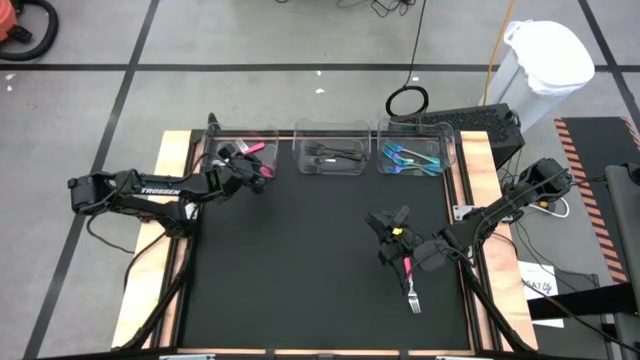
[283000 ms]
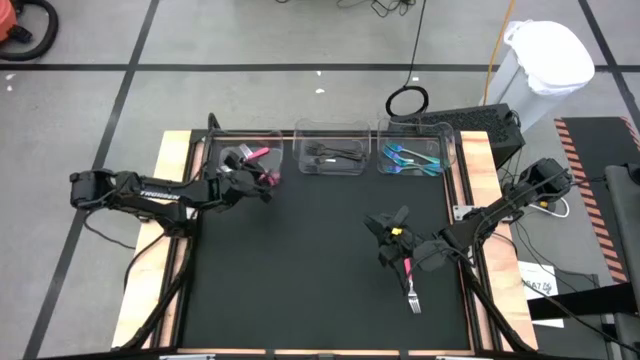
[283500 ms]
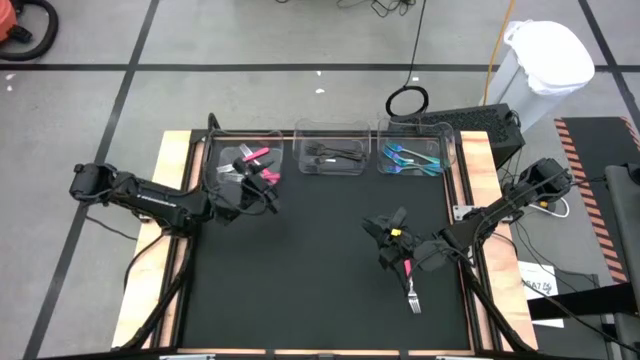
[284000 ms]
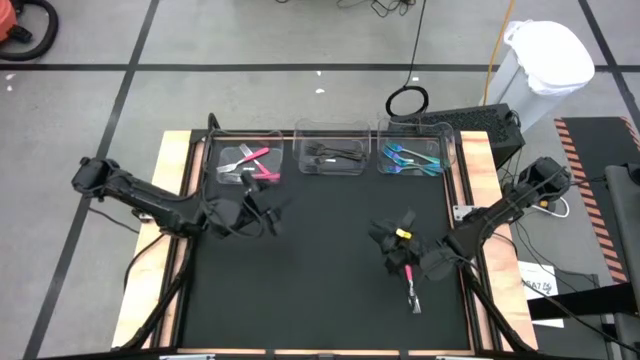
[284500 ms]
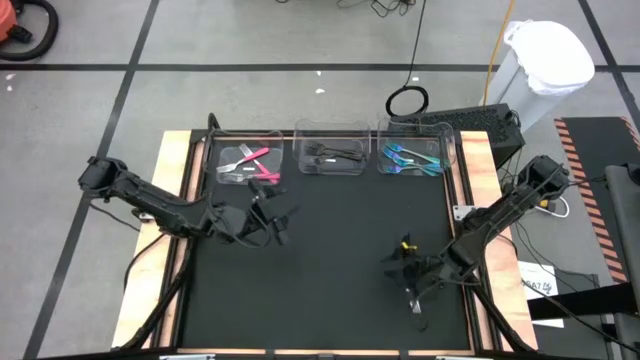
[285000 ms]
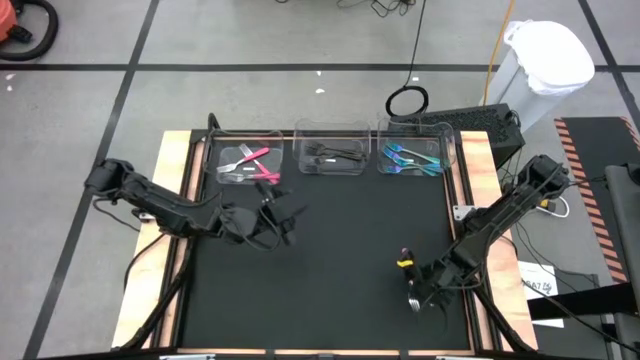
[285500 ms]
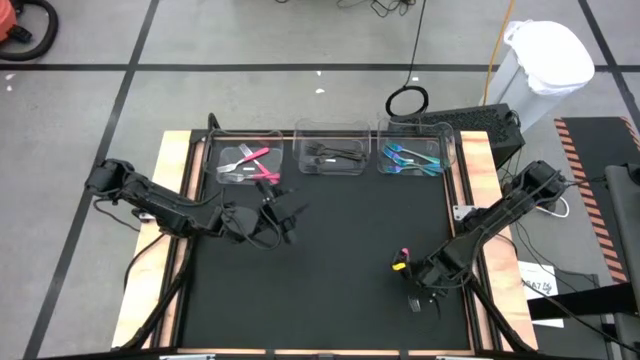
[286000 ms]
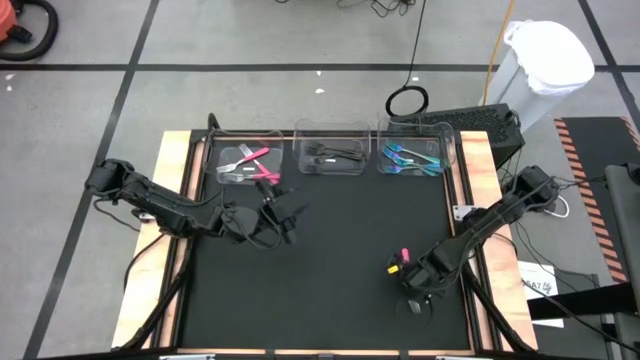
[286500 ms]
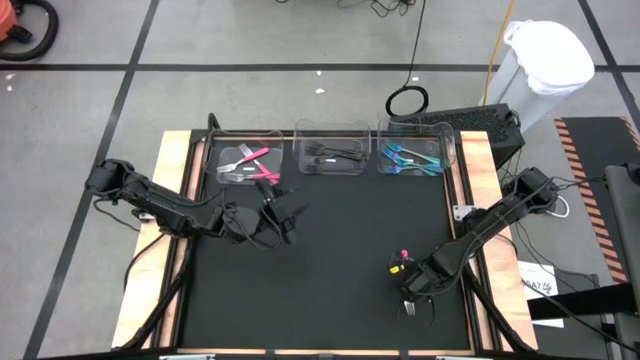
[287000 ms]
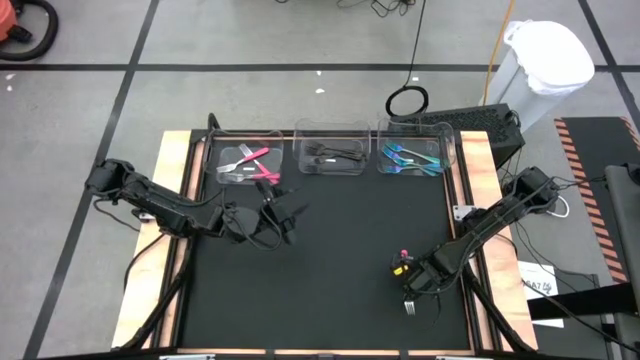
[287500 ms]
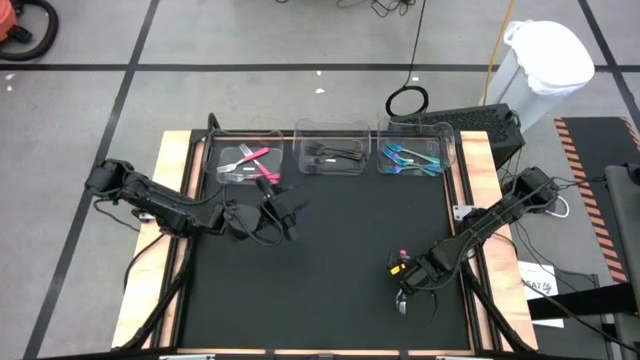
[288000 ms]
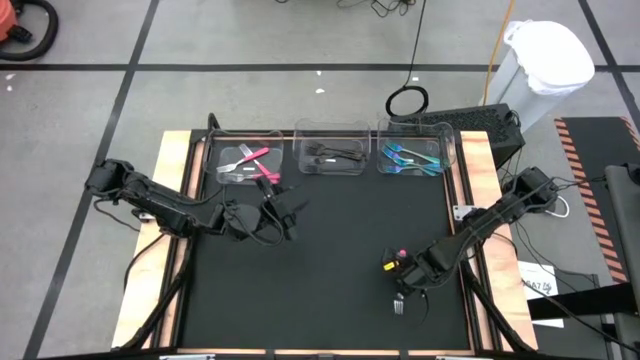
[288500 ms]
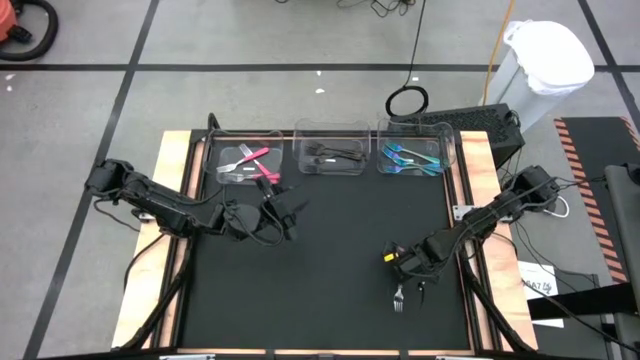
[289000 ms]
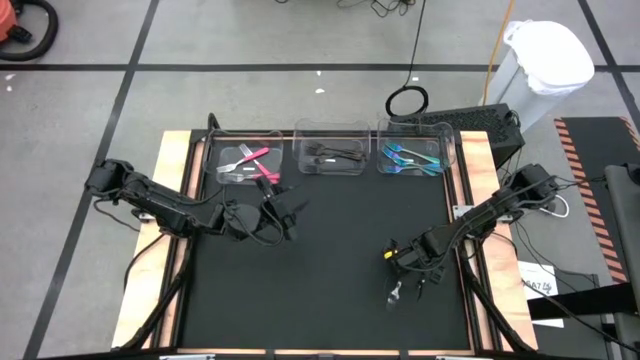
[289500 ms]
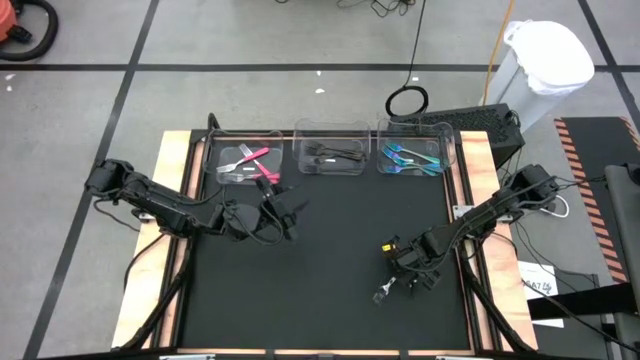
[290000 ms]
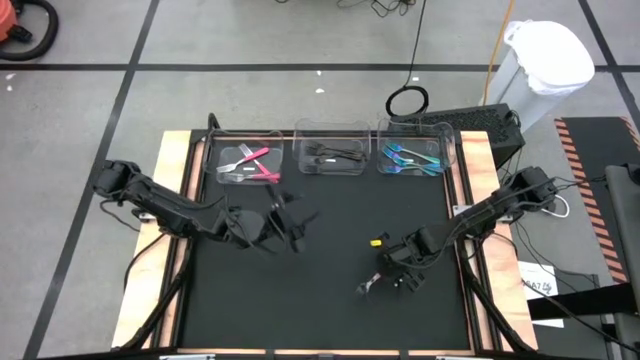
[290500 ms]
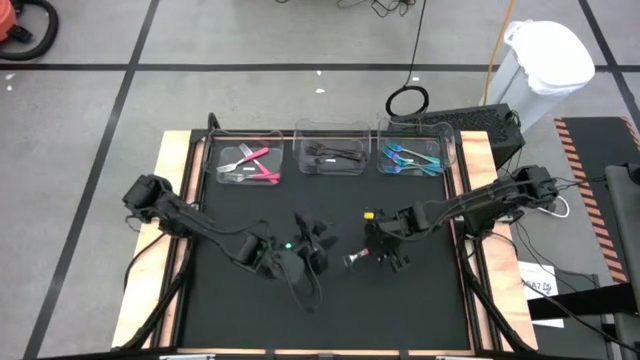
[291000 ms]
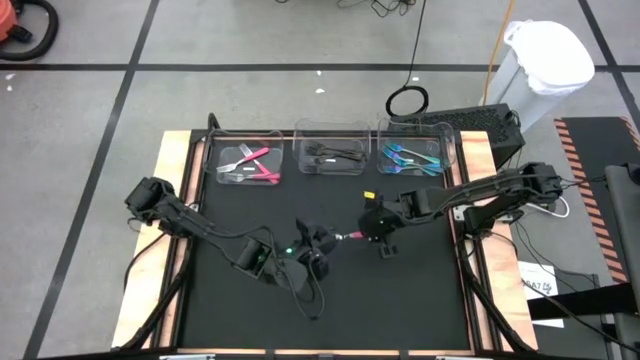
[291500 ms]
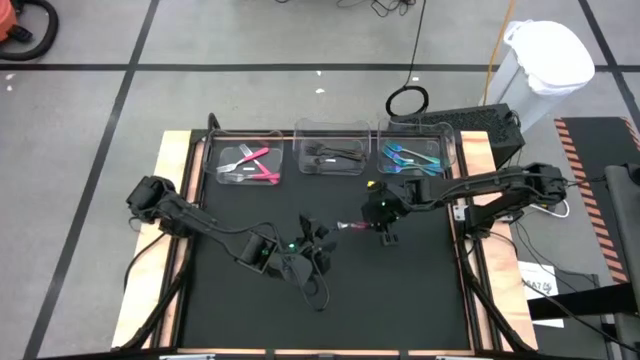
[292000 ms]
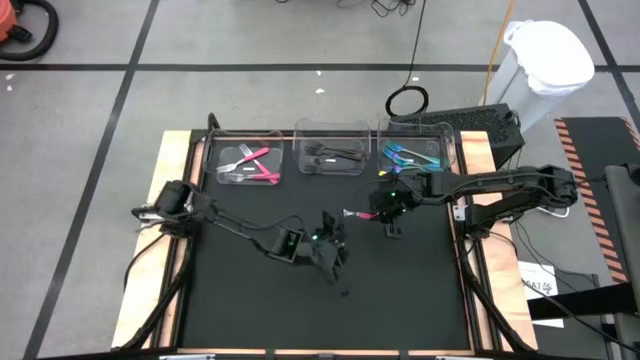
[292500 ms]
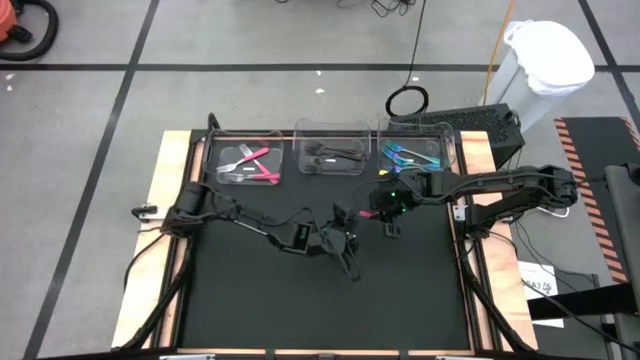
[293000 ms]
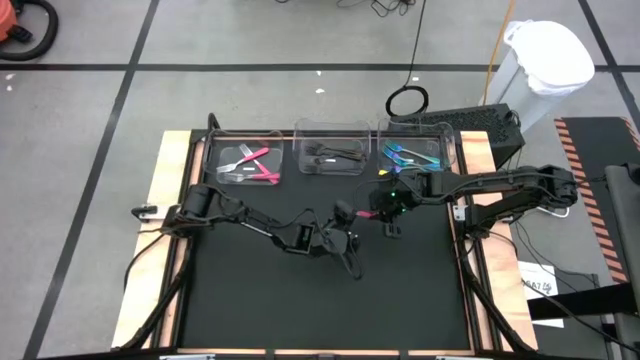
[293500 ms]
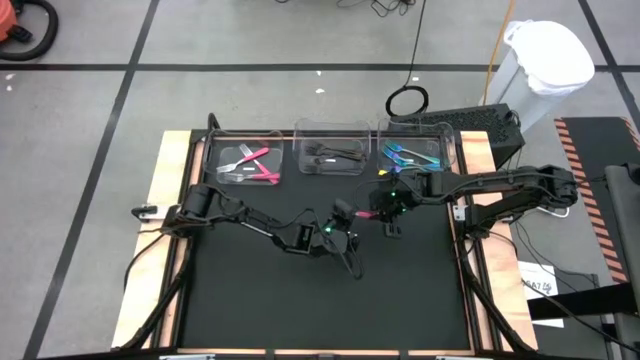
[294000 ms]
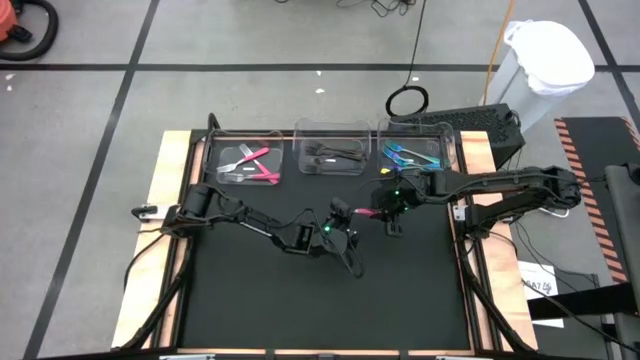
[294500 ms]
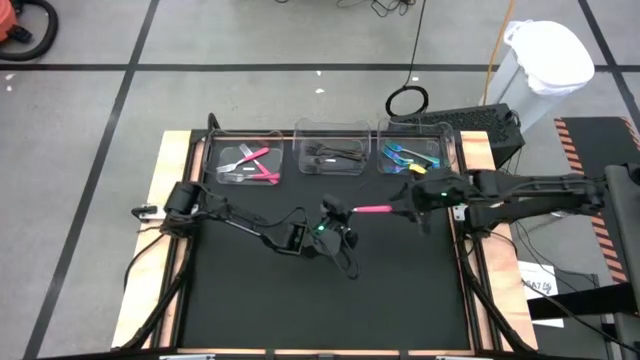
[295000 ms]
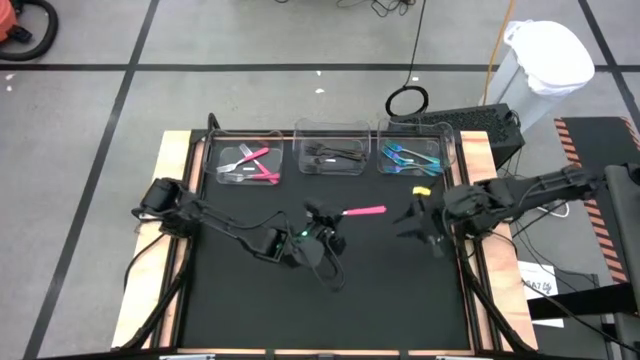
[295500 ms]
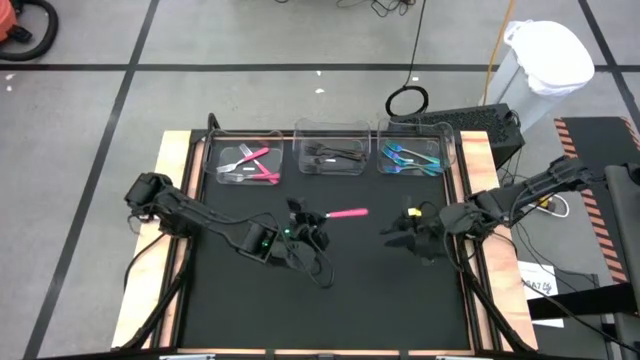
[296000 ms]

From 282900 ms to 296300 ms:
Task: Sort silverware by color (type)
Put the pink fork into the transparent bin

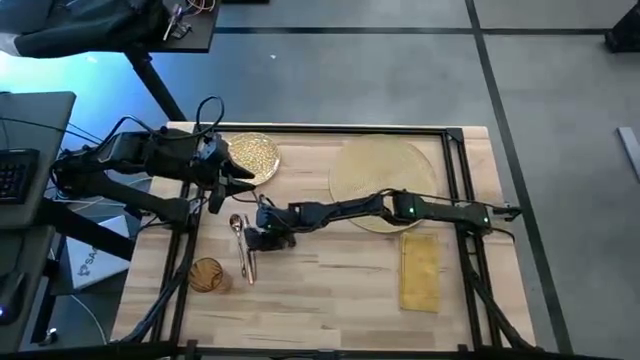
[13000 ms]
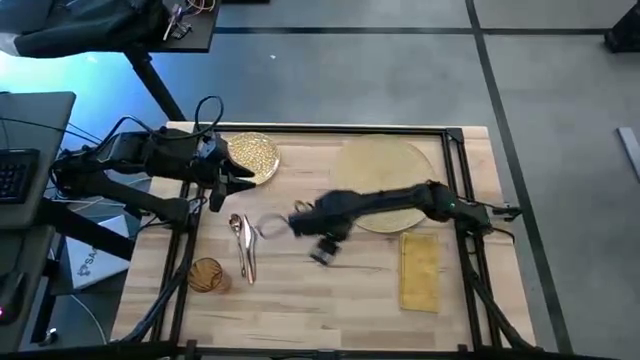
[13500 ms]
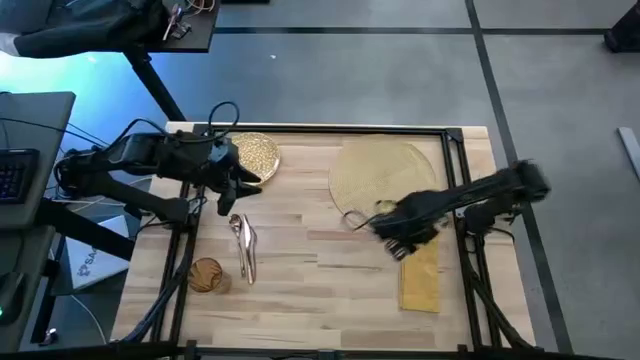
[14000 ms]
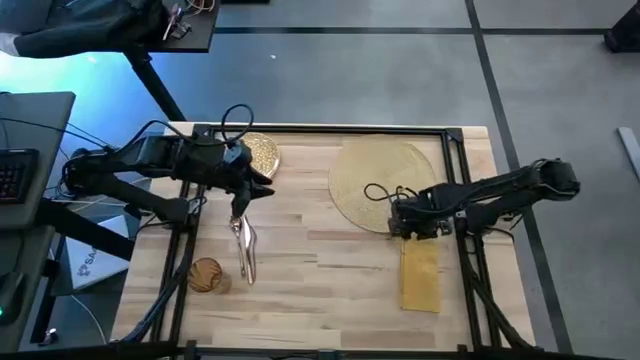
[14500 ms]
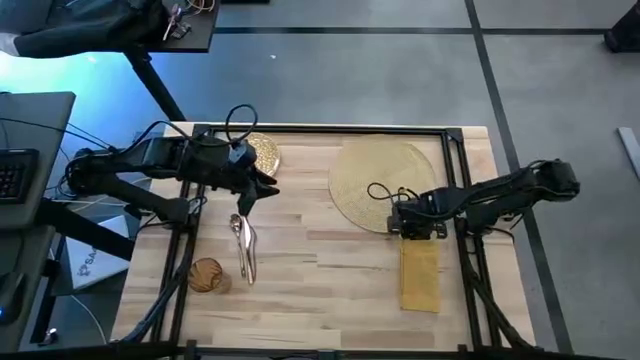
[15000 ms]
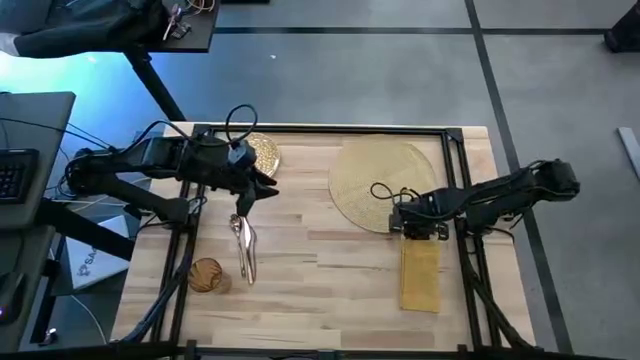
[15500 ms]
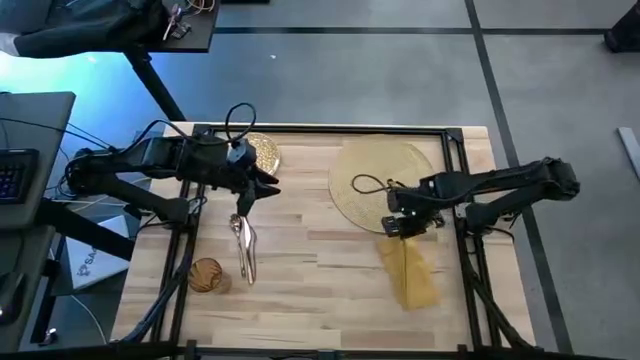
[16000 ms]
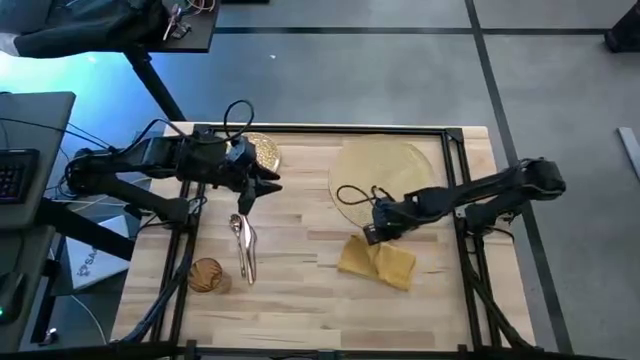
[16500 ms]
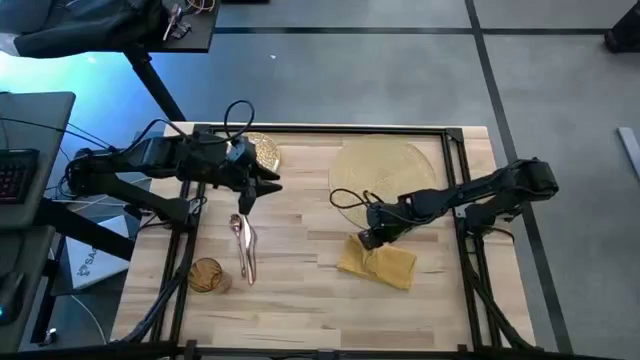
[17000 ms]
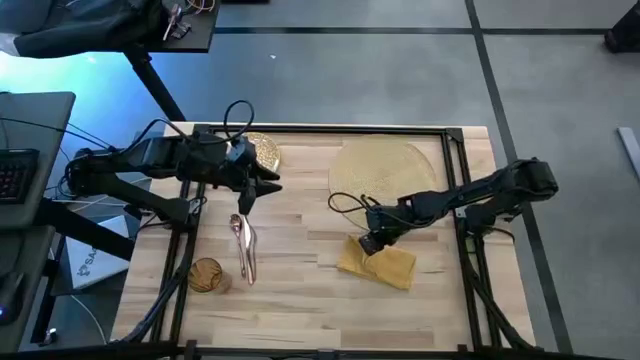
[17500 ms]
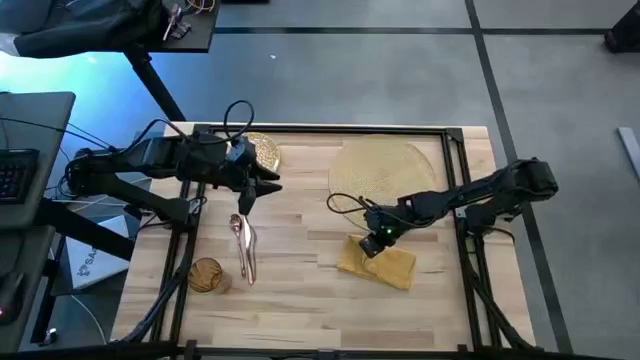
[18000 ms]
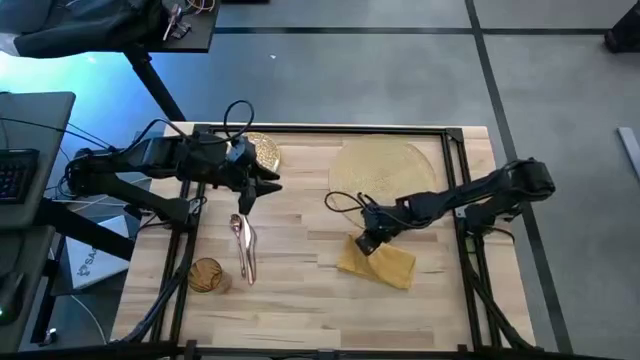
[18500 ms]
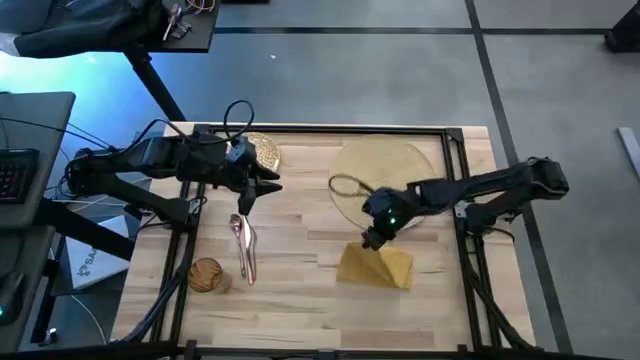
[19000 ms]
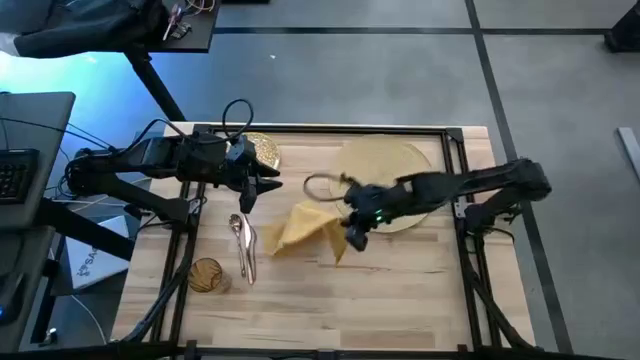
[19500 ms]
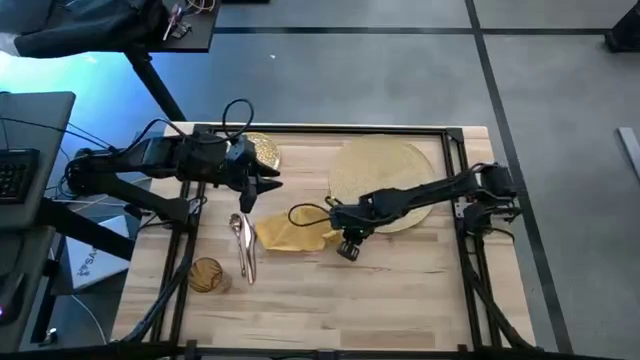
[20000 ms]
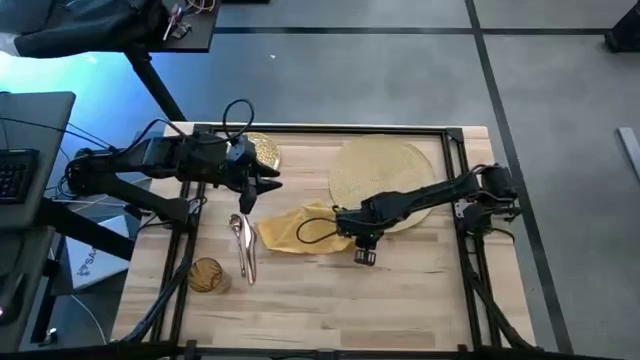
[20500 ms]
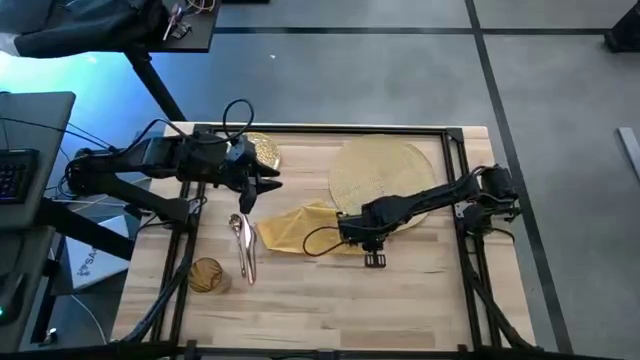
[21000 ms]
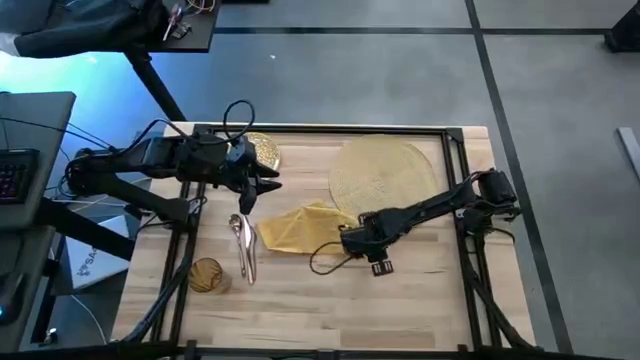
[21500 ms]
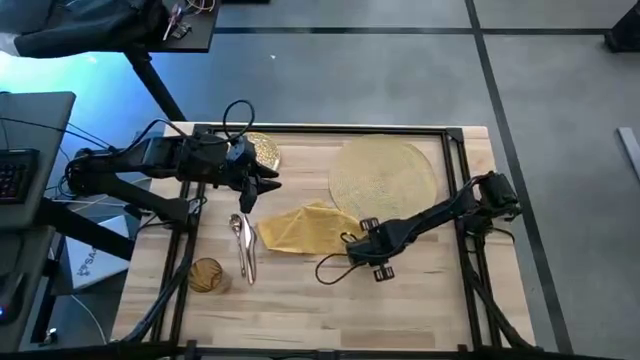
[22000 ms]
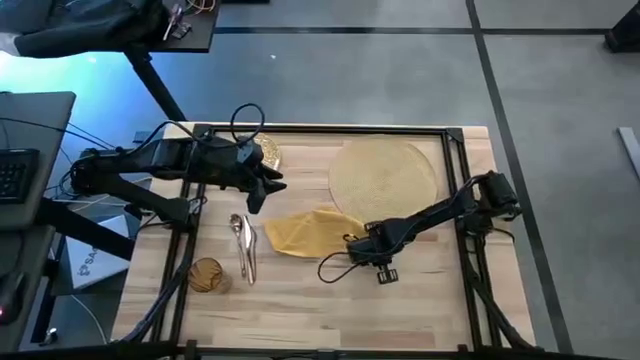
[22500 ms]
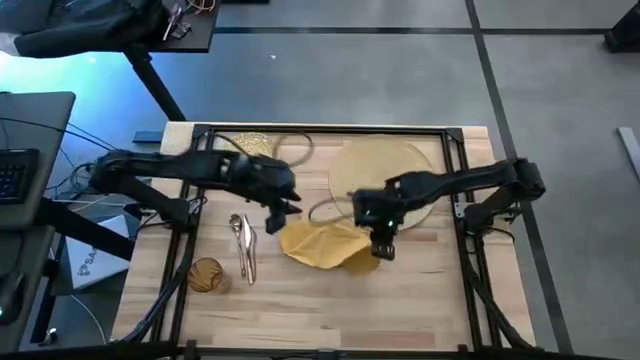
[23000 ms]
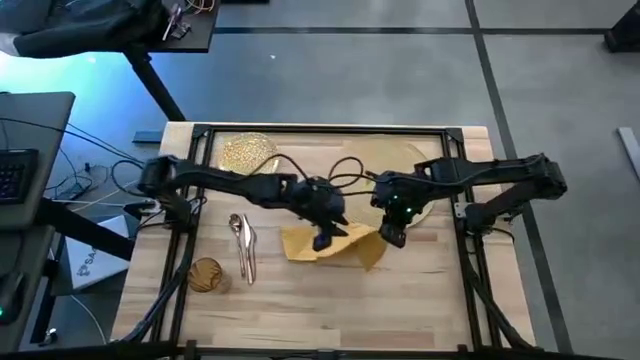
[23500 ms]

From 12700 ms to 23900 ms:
Task: Set table place
Fold the yellow table napkin on the table
